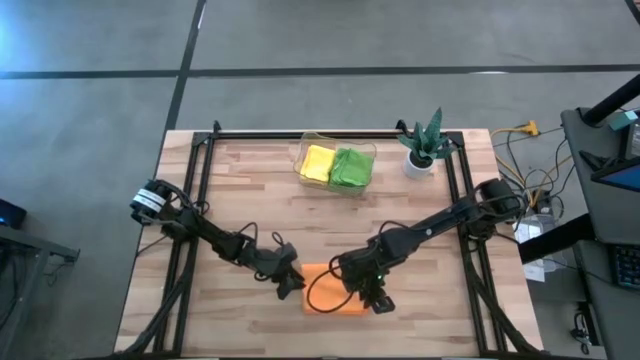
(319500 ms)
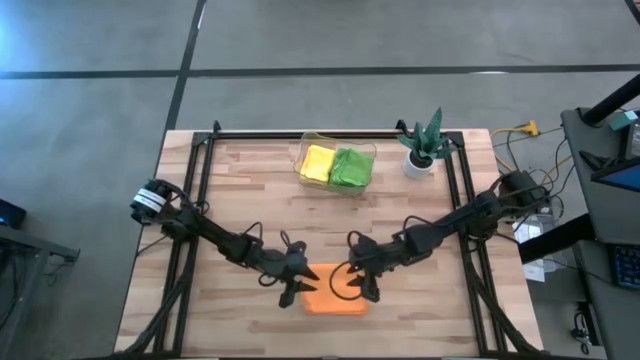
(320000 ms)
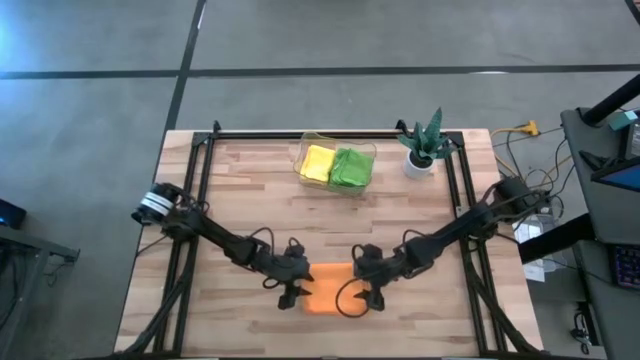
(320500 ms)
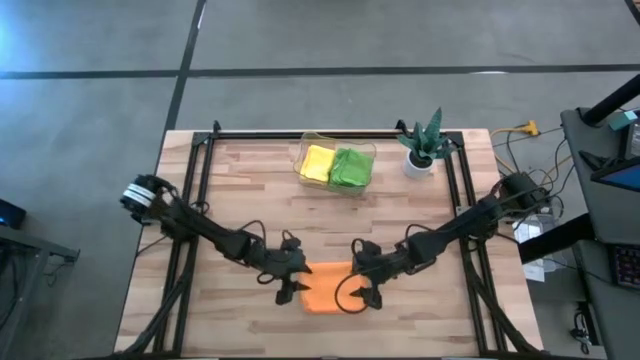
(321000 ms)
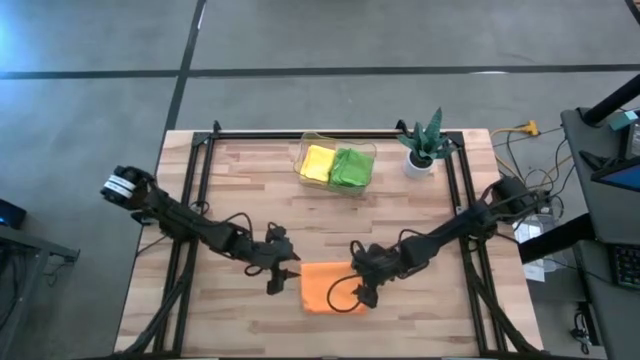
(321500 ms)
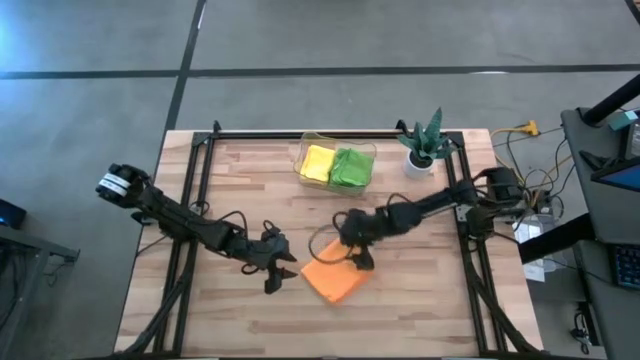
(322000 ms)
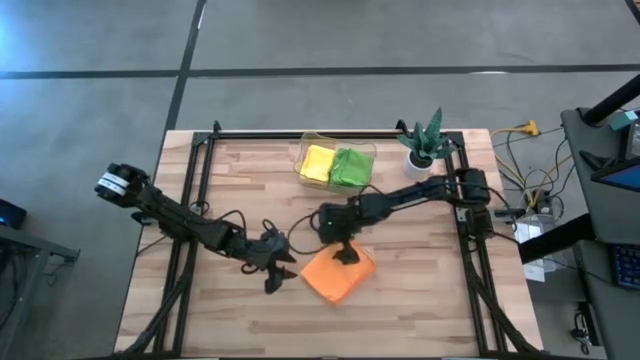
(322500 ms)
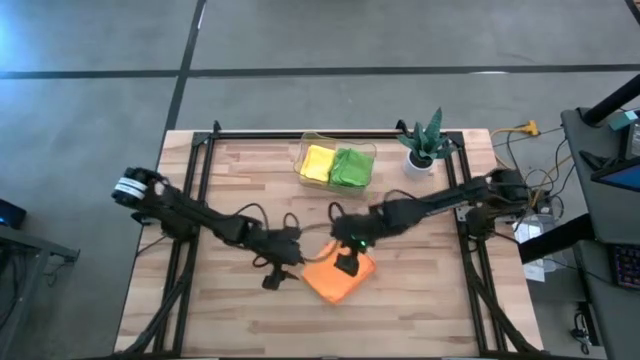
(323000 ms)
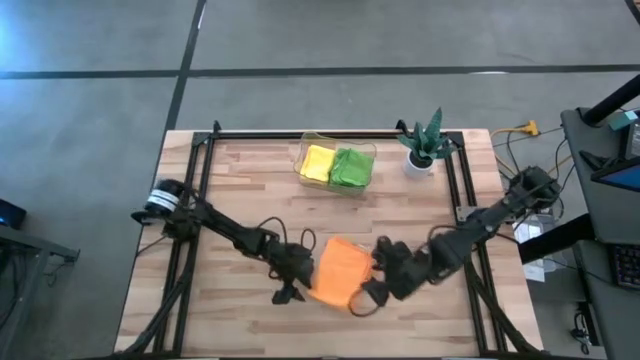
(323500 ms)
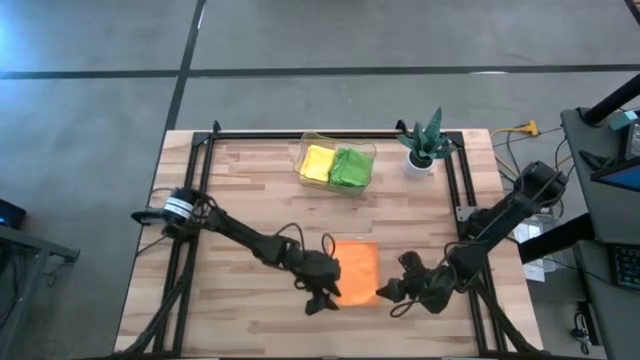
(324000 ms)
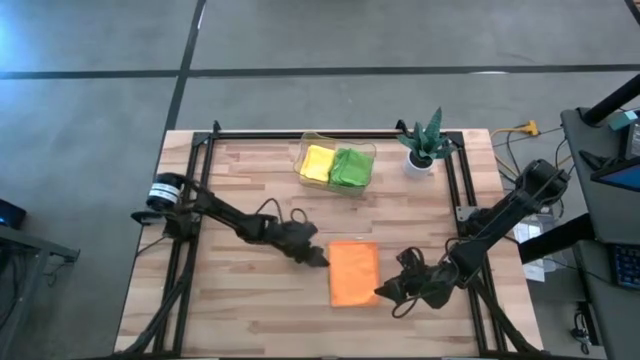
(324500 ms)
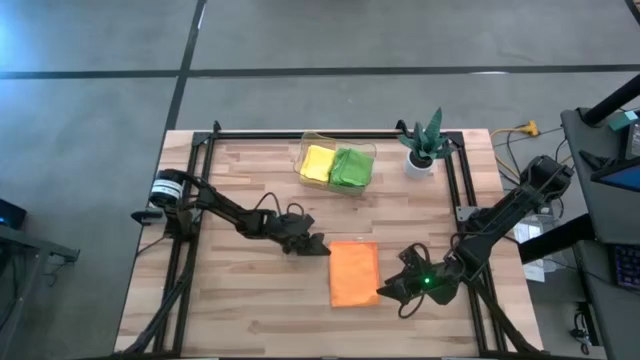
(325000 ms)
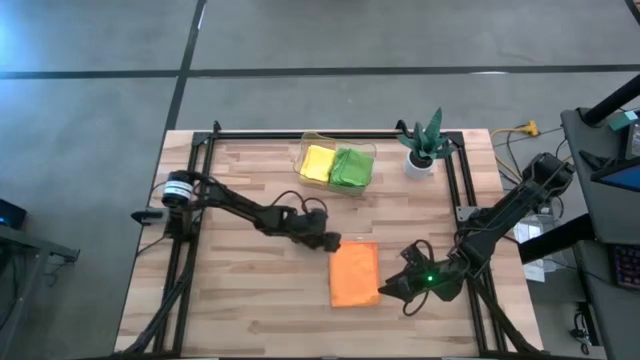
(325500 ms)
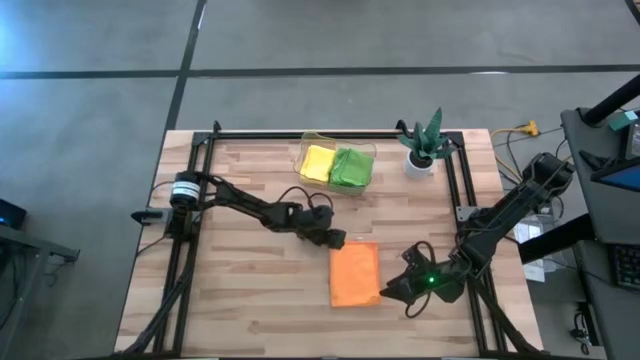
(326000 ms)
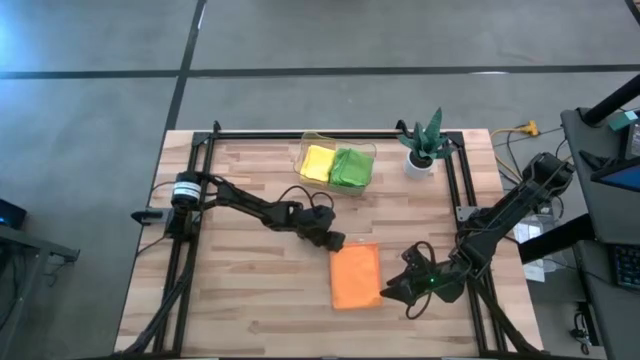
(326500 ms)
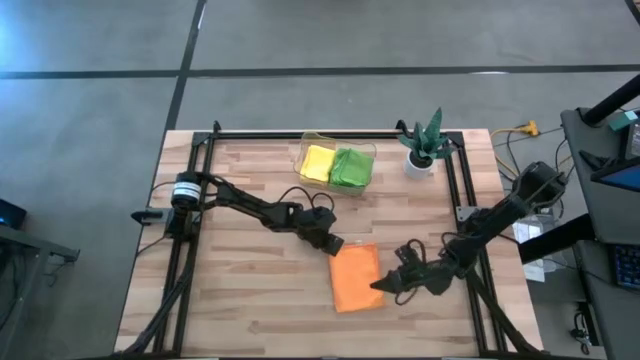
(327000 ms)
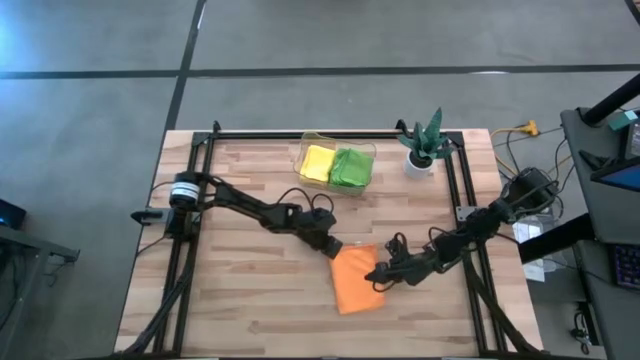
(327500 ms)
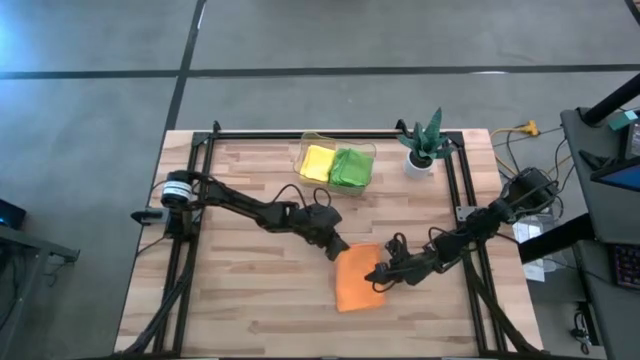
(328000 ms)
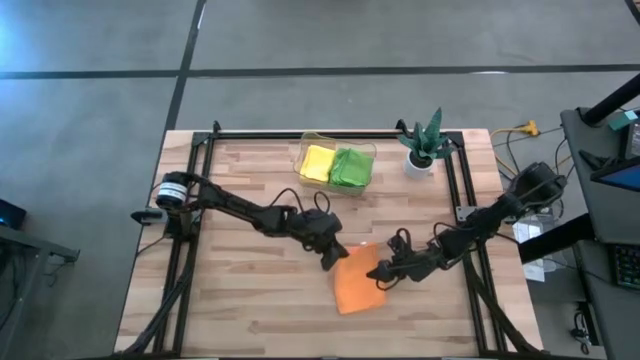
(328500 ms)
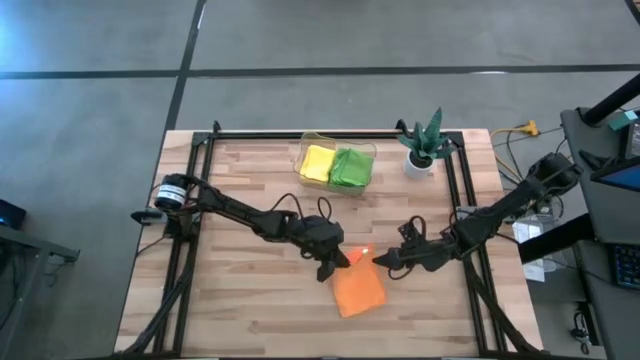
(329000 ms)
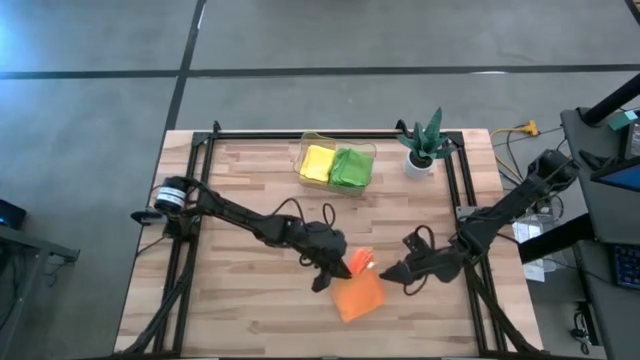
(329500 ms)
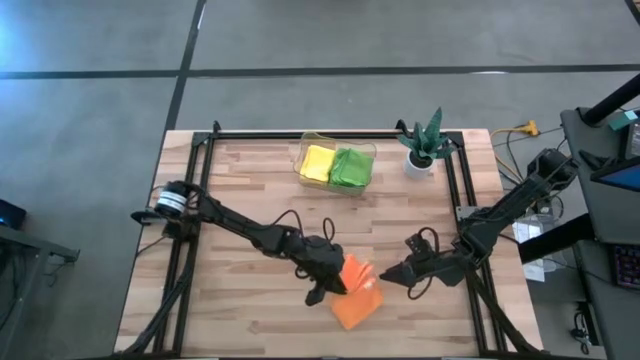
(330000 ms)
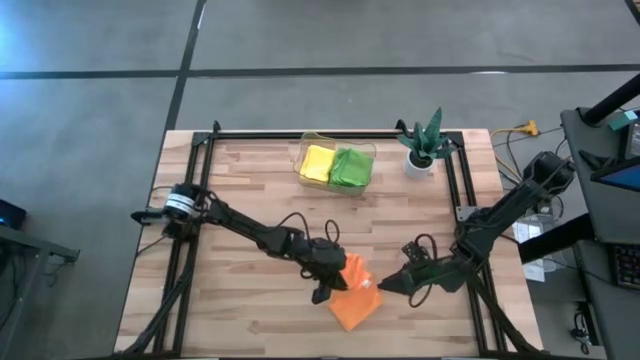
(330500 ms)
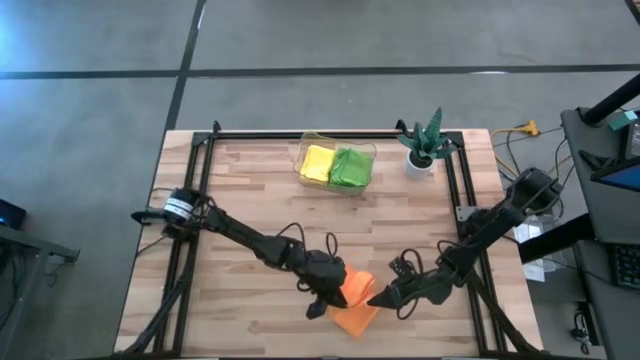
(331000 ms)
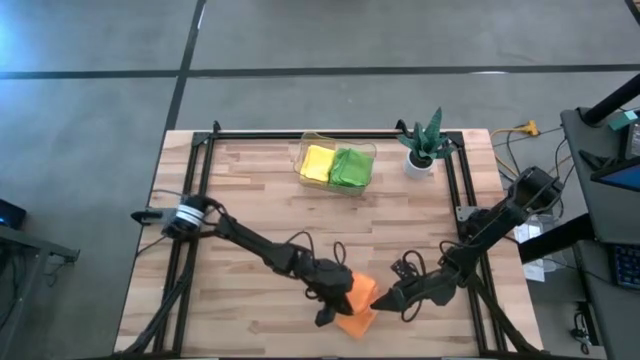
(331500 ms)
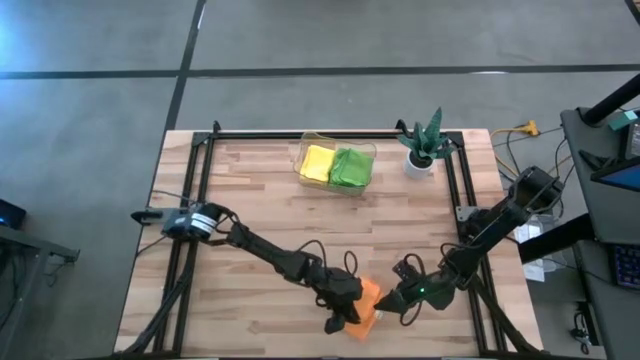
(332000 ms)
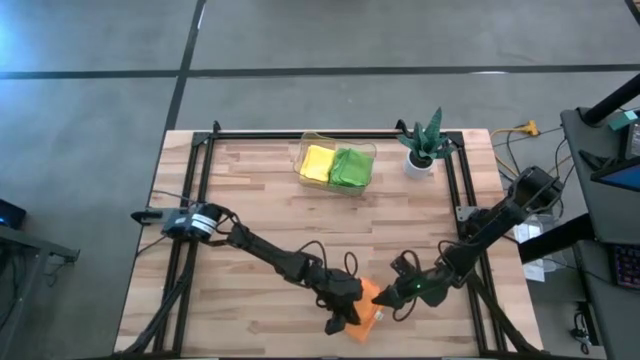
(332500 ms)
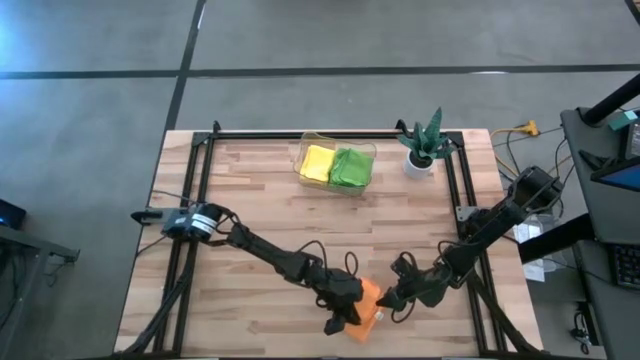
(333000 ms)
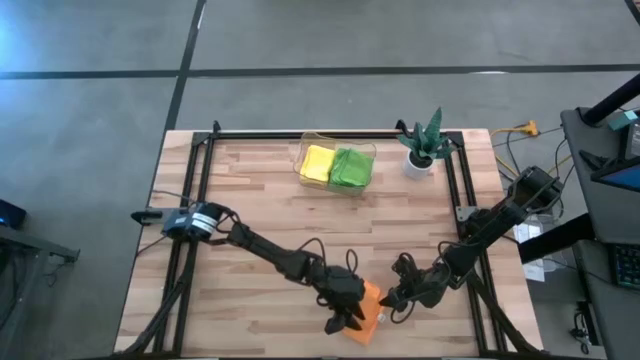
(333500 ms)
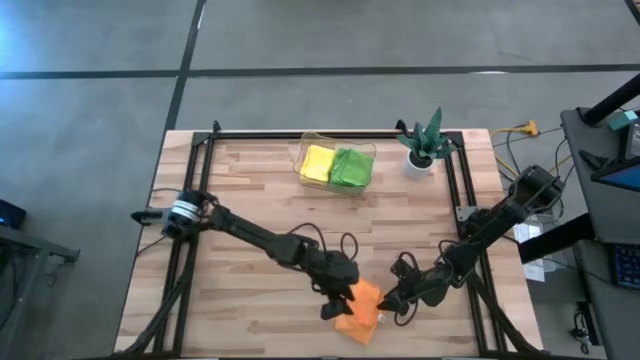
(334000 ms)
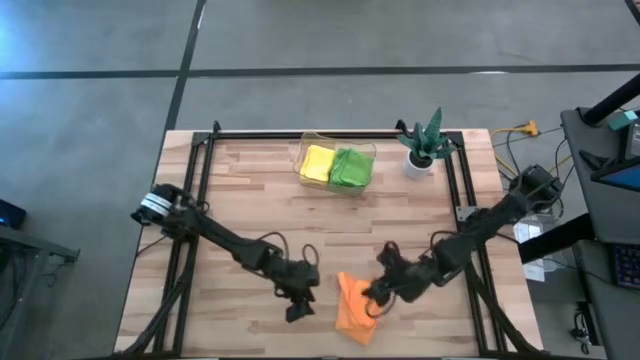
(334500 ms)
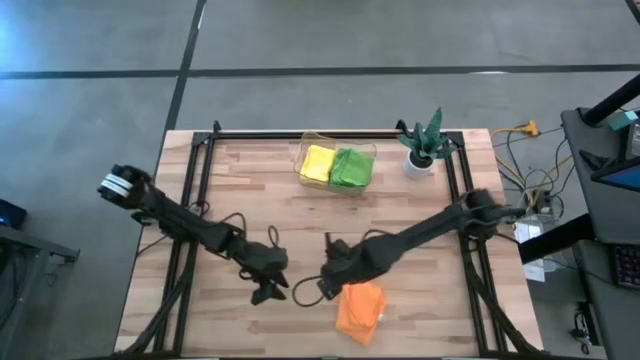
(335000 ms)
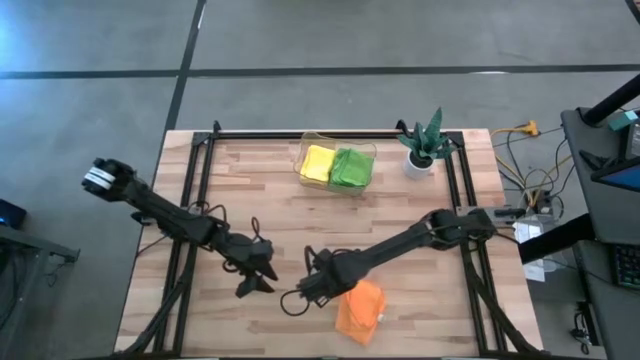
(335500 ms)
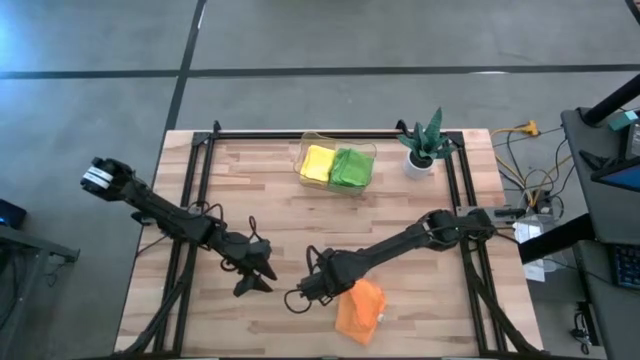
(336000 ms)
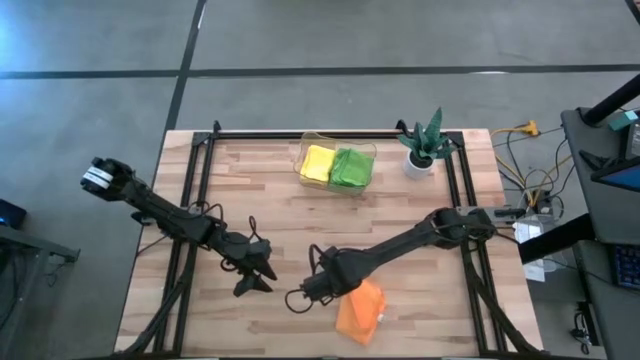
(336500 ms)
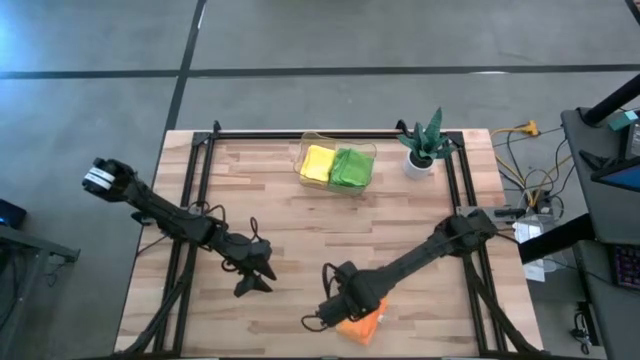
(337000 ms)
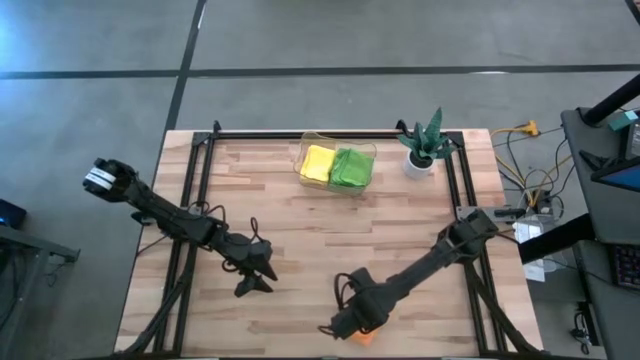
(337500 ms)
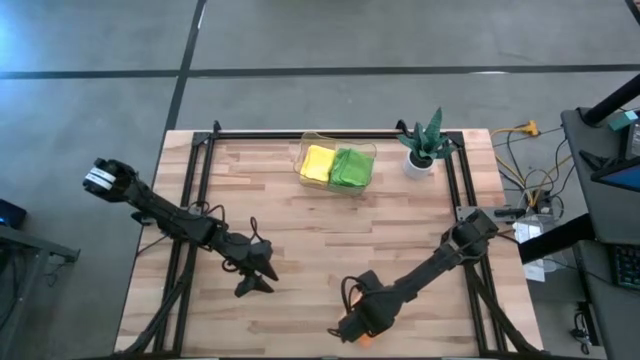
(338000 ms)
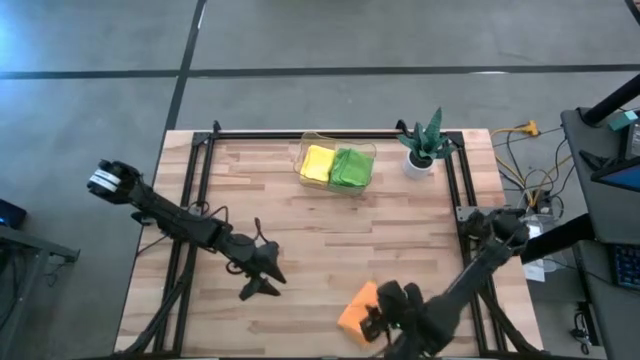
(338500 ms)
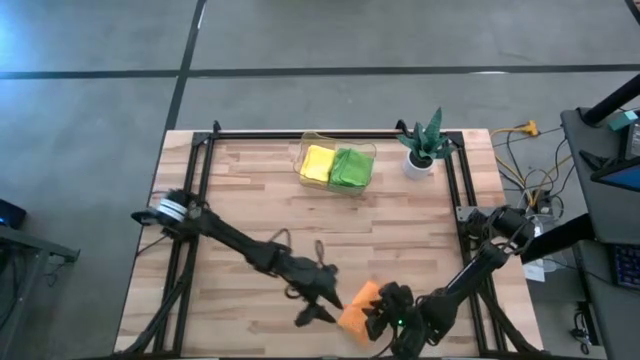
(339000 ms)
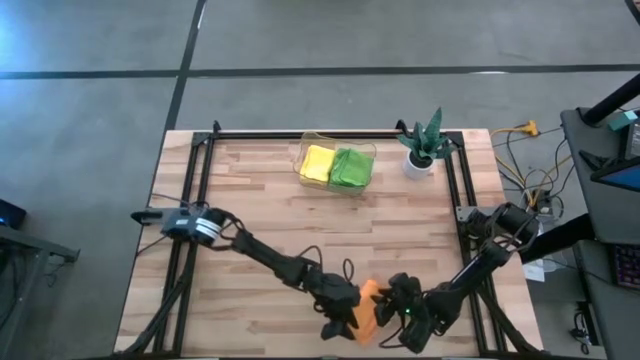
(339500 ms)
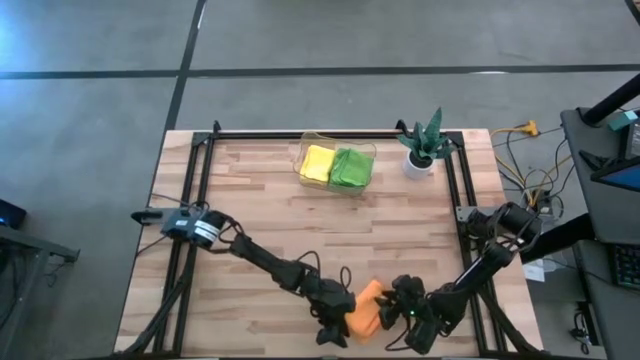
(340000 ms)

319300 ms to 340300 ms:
Task: Fold microfiber towels
Fold the orange microfiber towel

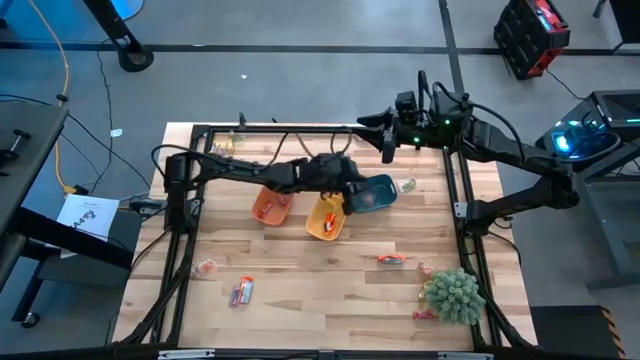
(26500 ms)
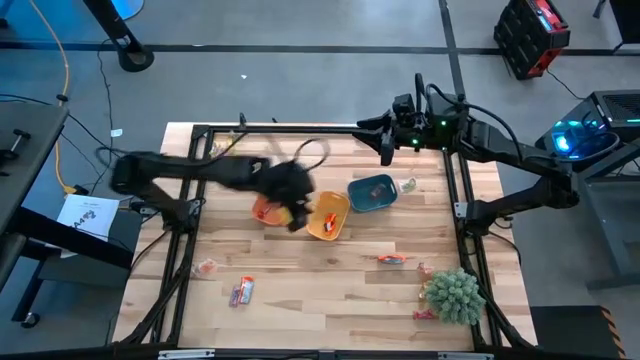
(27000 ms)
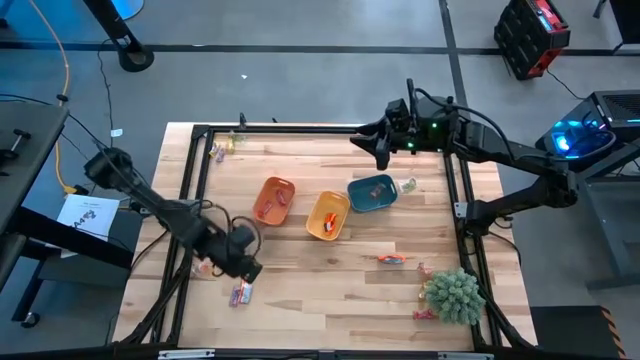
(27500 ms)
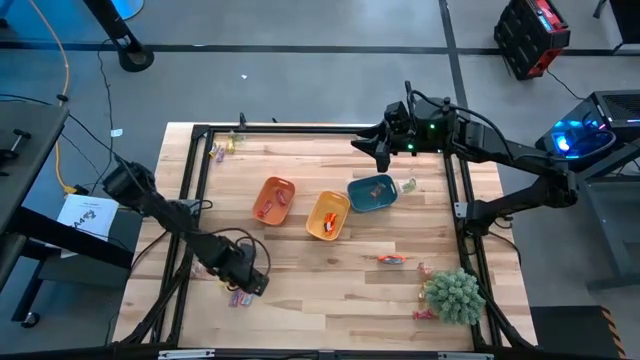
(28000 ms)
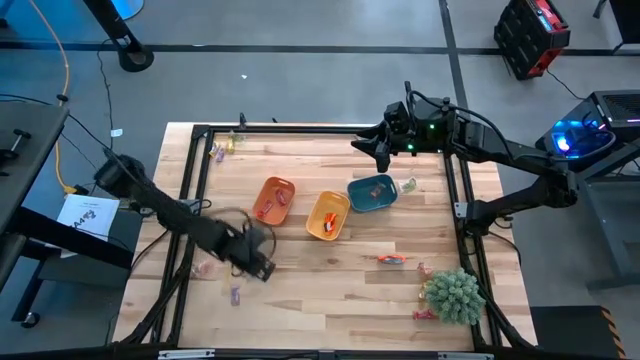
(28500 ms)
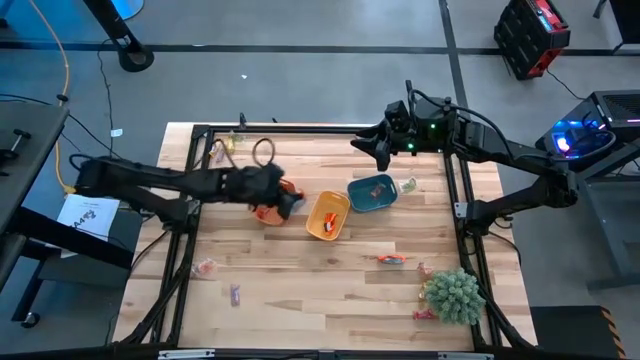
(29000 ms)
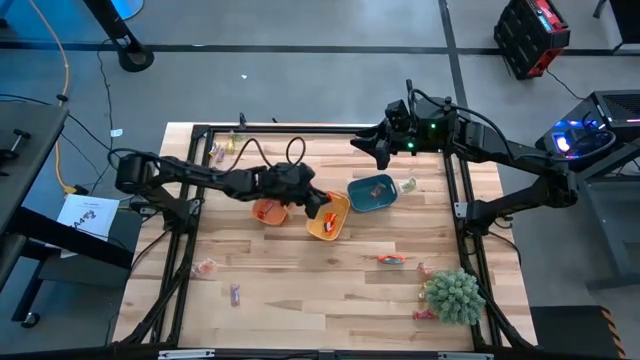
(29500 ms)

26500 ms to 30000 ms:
Task: Sort candy
Put the orange chocolate into the yellow bin
